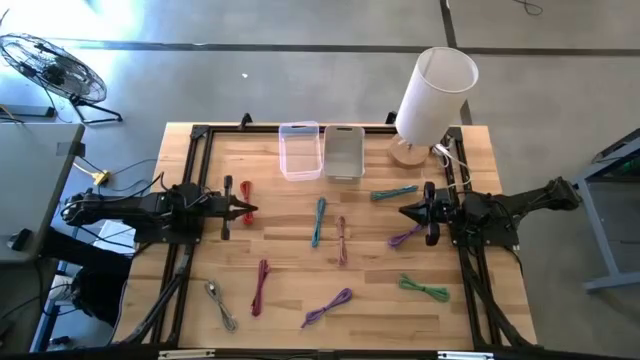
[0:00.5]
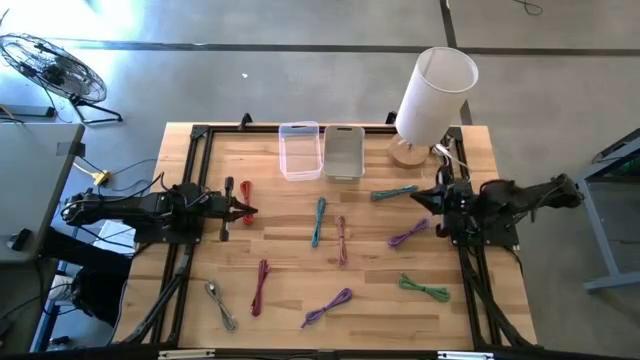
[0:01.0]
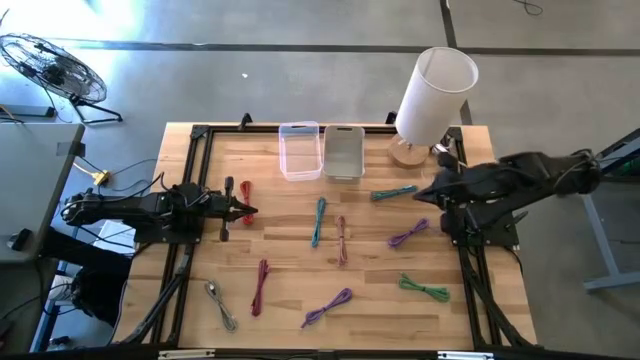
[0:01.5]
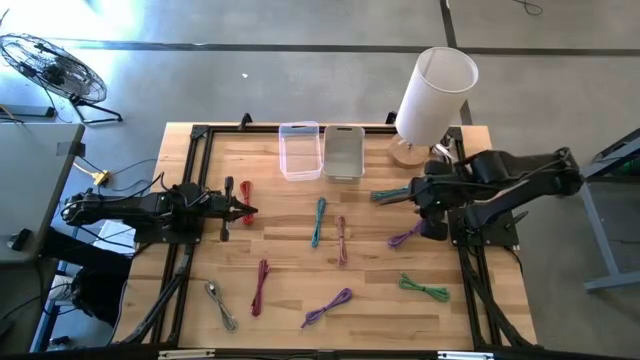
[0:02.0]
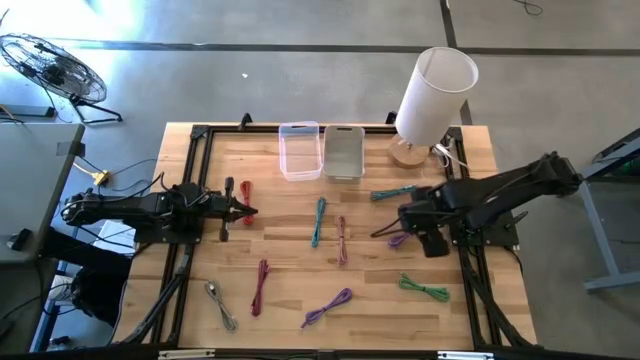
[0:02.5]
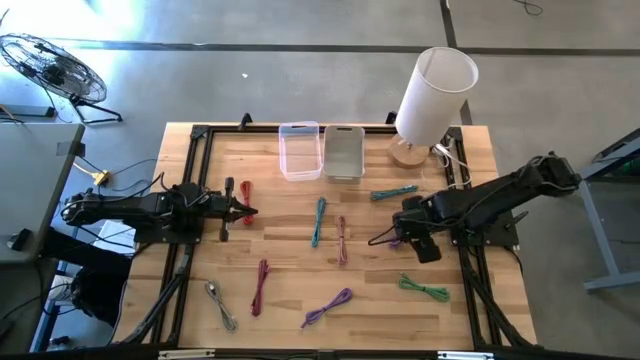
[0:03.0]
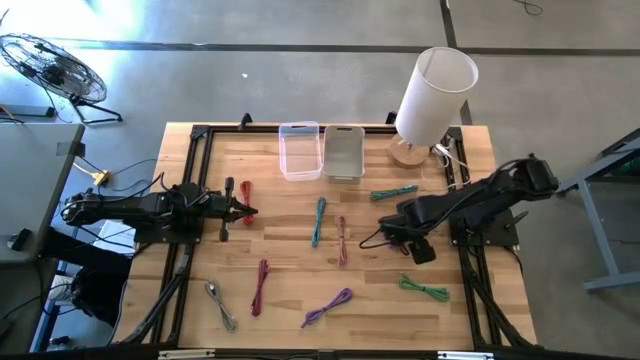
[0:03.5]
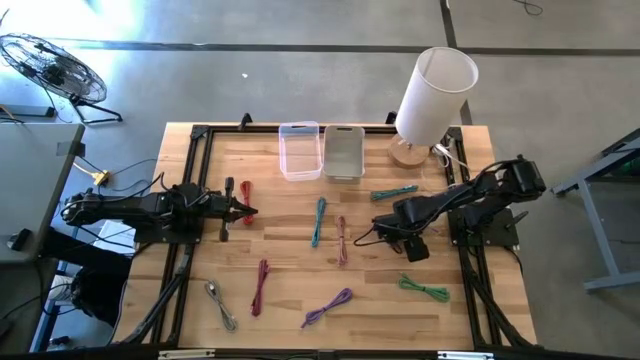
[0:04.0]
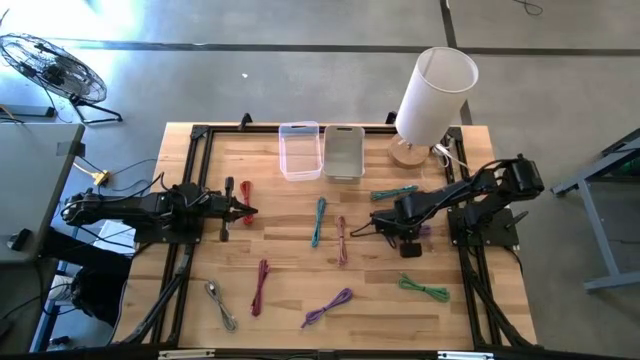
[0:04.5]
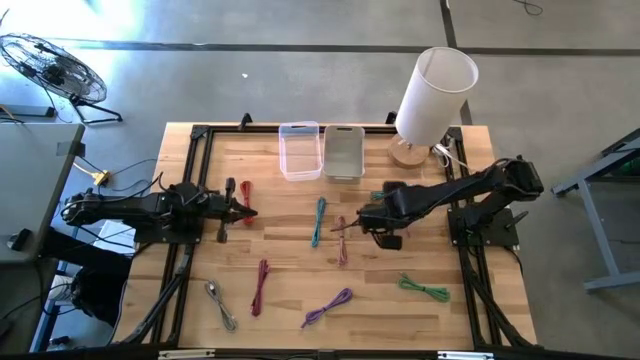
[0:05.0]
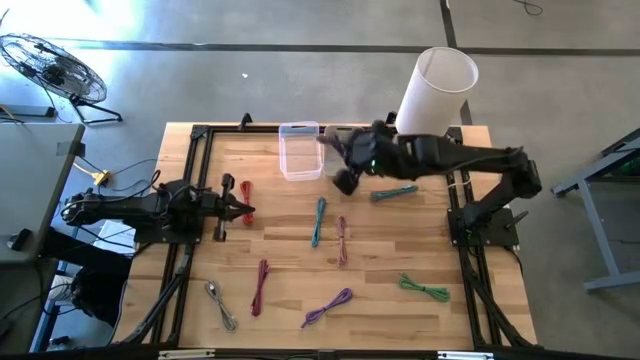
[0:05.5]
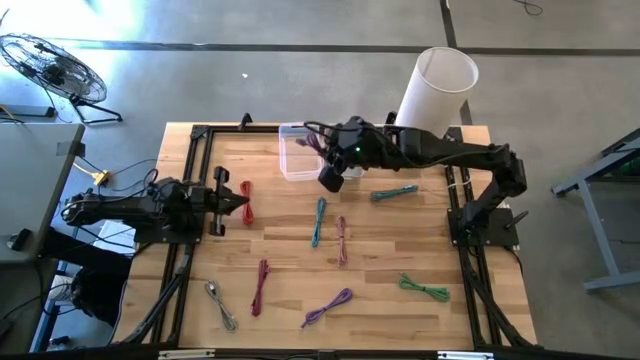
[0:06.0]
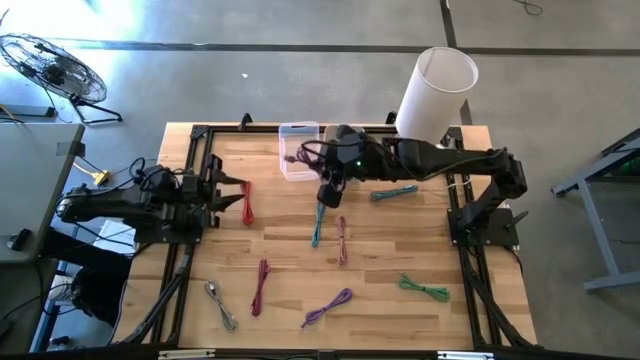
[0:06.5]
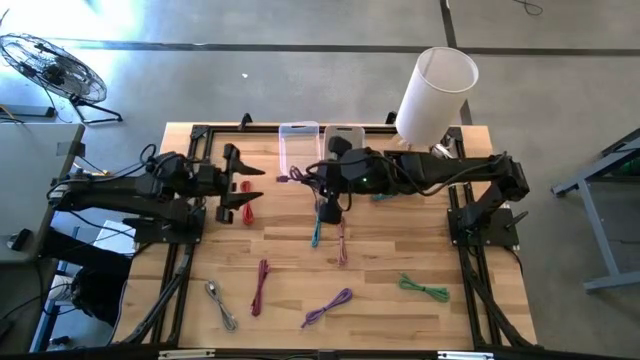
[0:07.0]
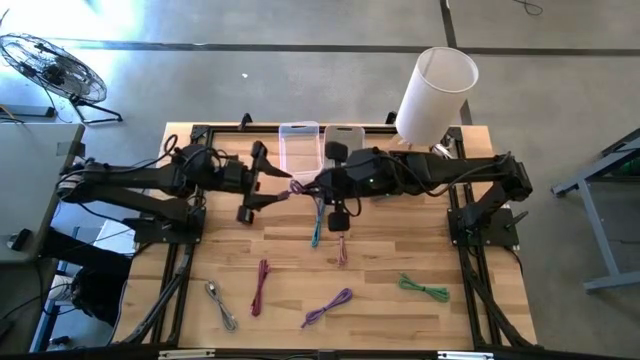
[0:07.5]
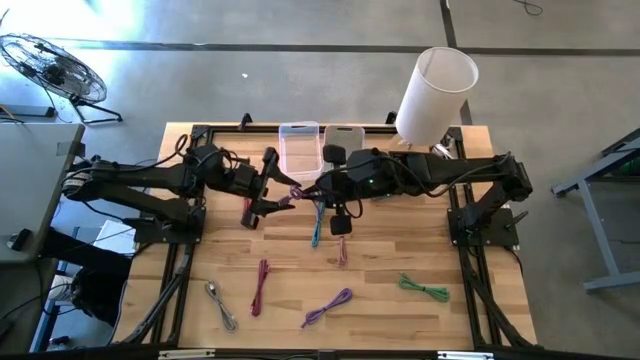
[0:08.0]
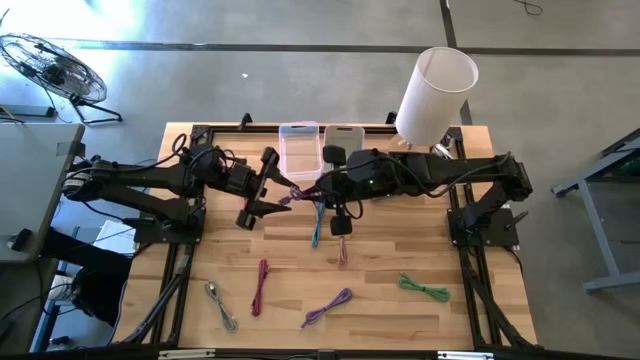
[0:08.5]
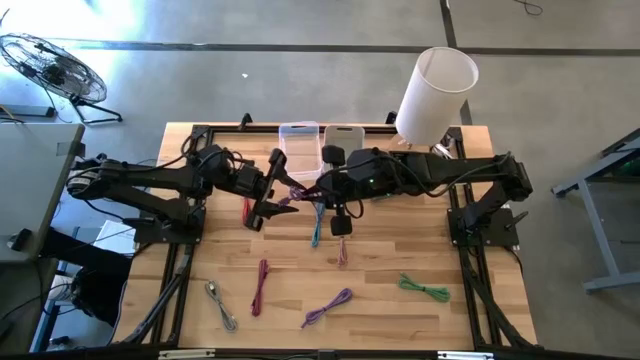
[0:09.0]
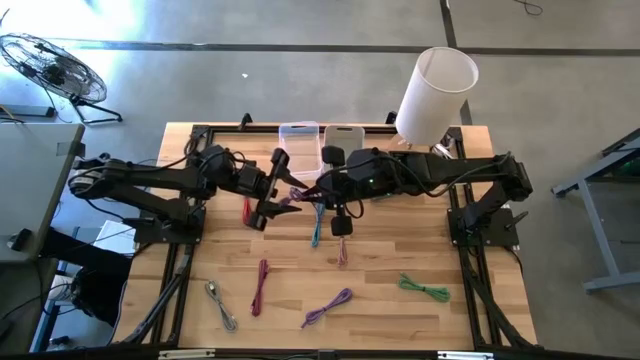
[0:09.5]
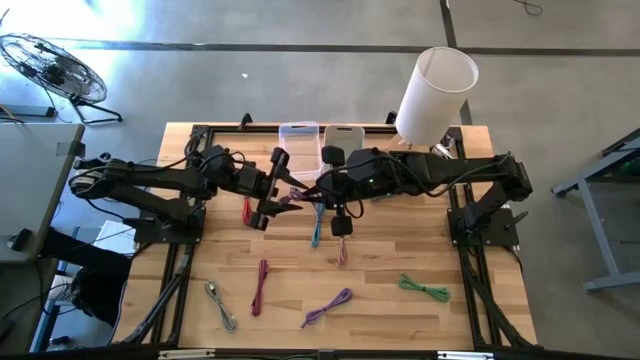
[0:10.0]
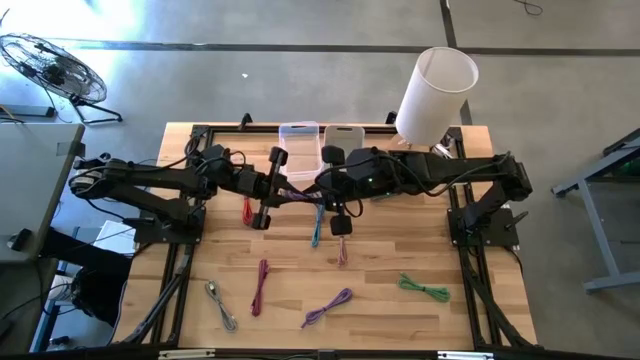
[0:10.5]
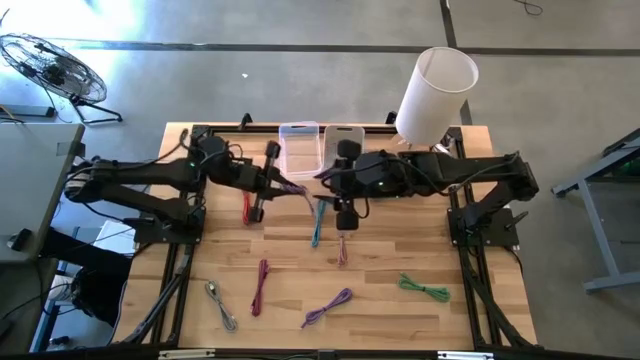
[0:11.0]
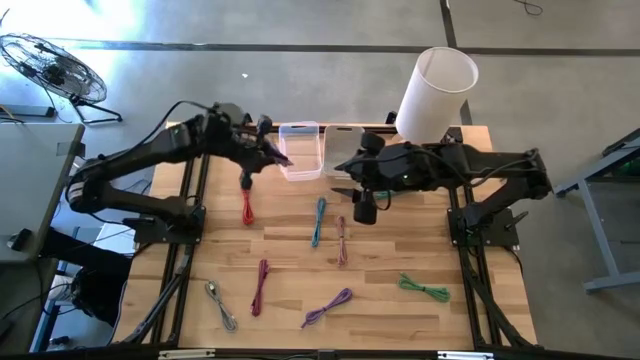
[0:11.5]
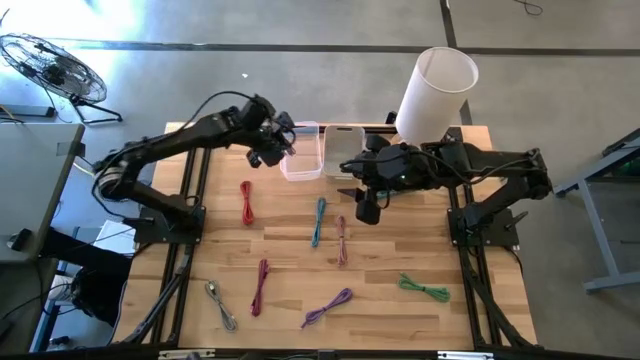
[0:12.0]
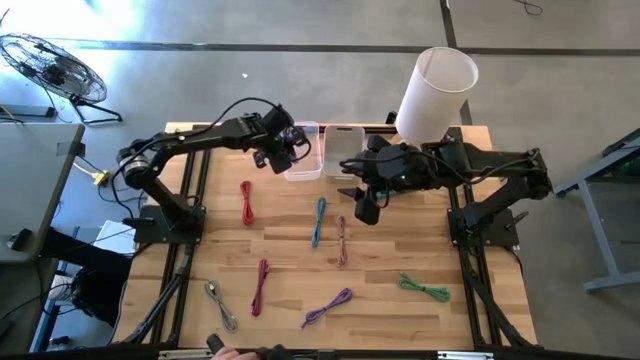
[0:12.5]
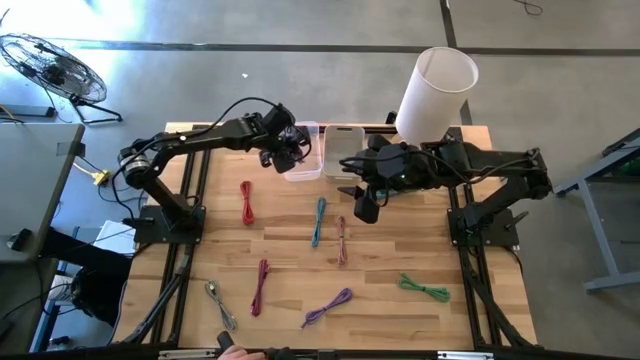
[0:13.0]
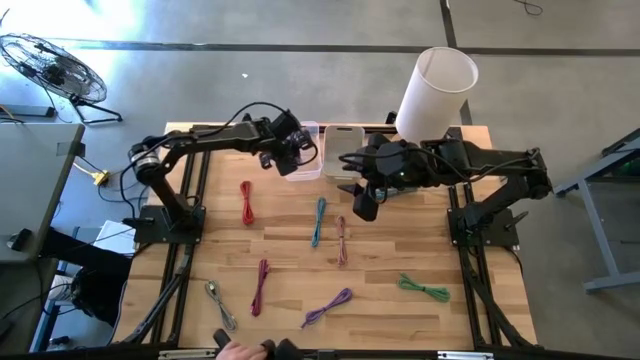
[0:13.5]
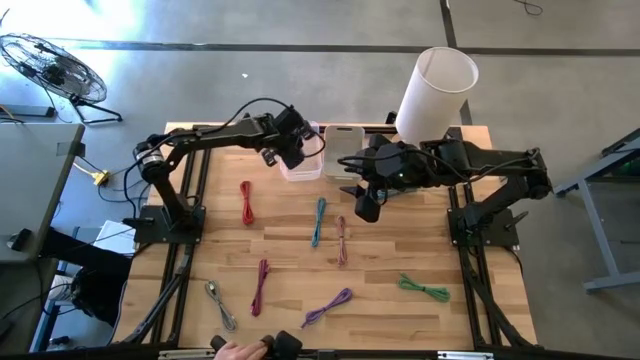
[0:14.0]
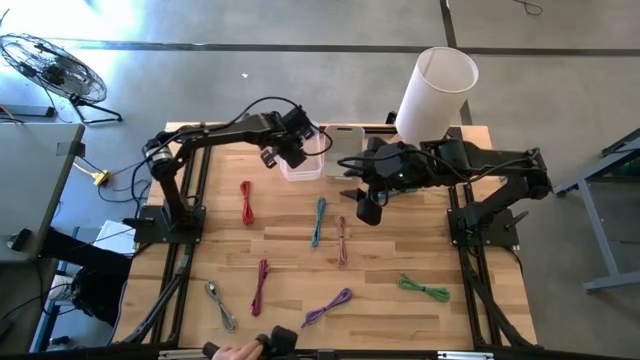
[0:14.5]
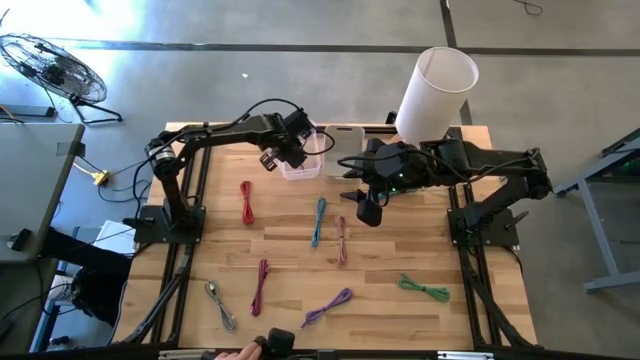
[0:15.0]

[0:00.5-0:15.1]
Task: Pick & Place USB Port
Put the top purple cable into the transparent bin

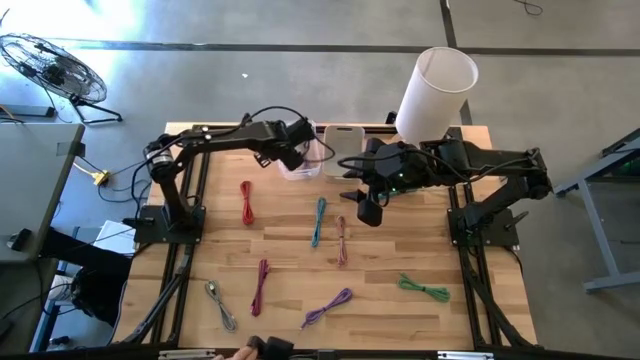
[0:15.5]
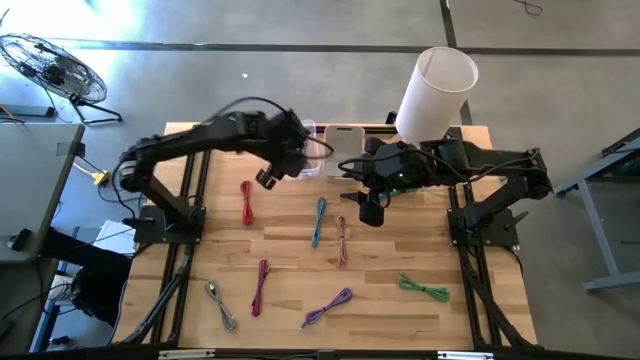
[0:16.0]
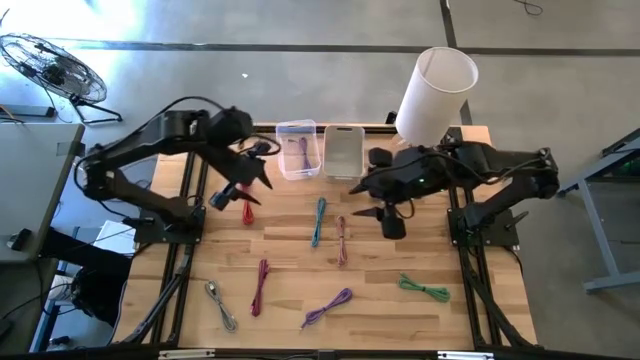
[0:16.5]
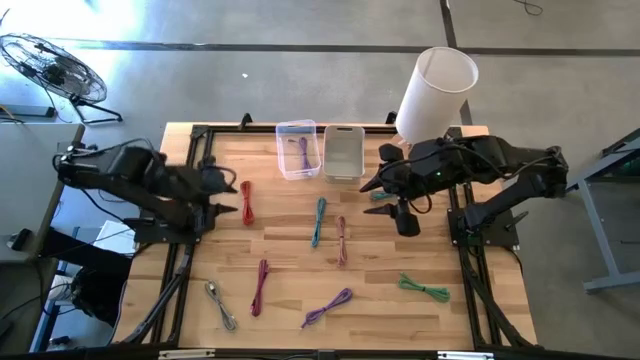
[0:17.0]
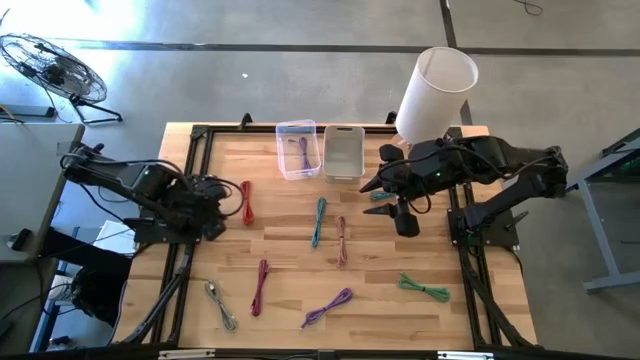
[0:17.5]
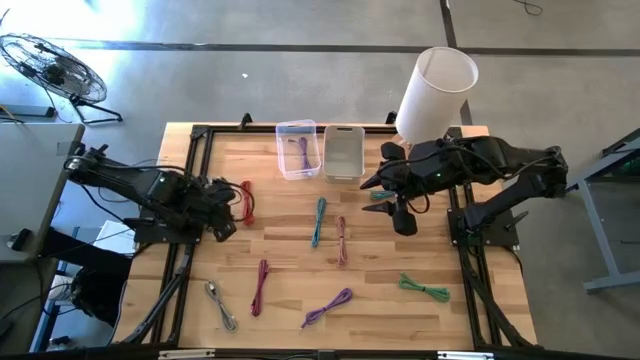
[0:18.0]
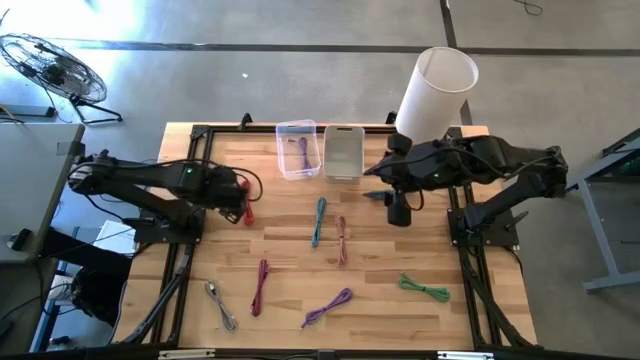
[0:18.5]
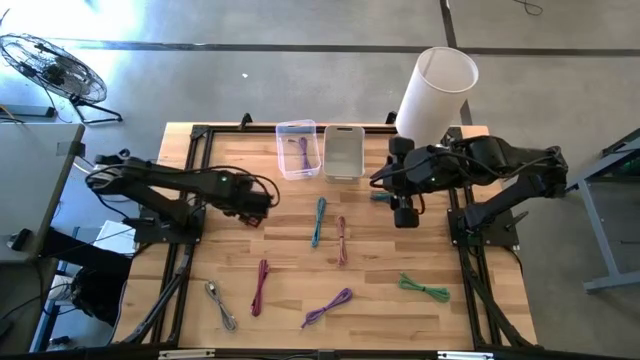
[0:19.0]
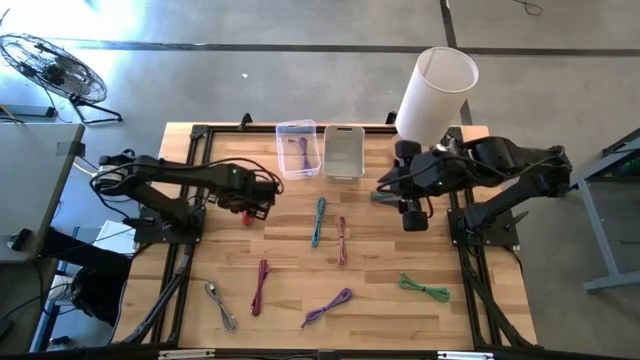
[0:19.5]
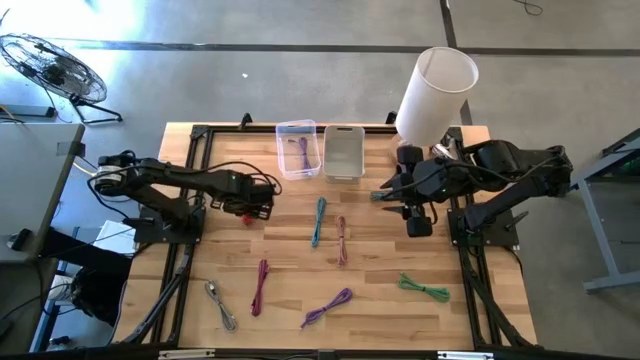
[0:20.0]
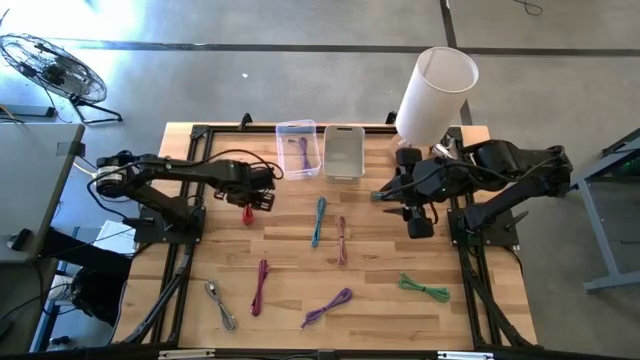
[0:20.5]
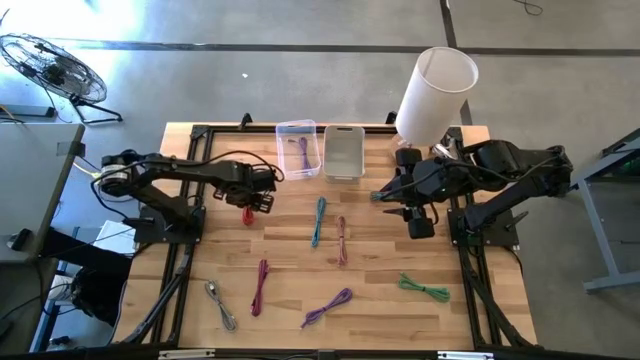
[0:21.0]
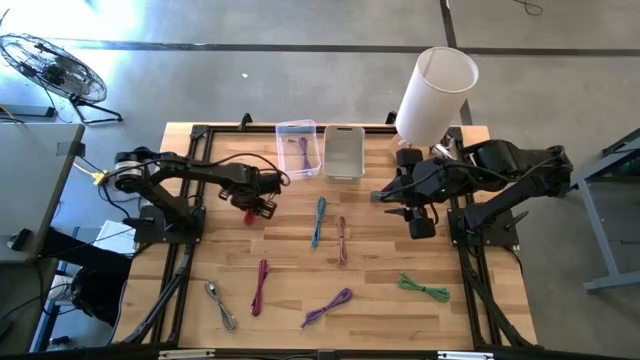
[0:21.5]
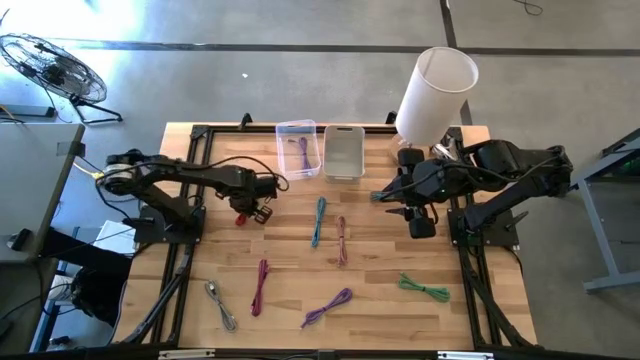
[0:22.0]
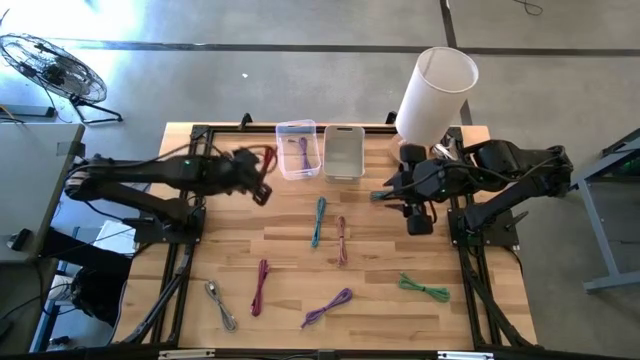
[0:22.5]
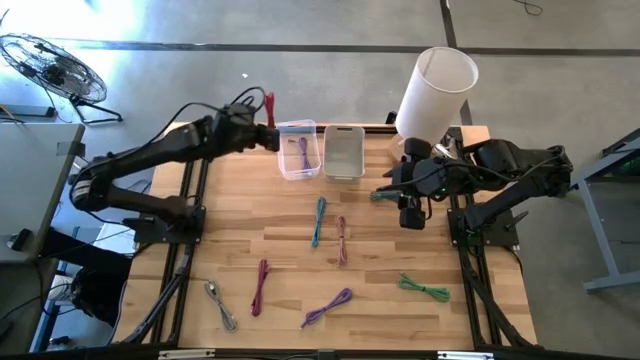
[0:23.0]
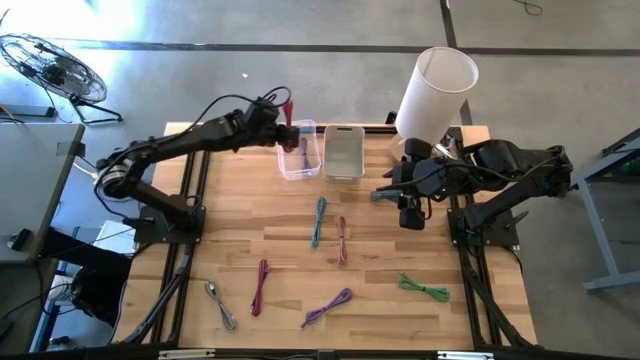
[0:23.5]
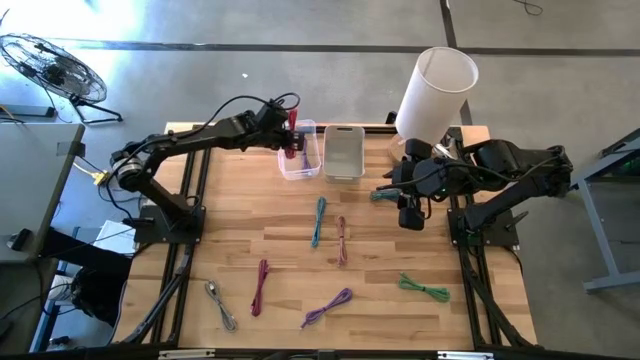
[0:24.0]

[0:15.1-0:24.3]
Put the red cable into the transparent bin
